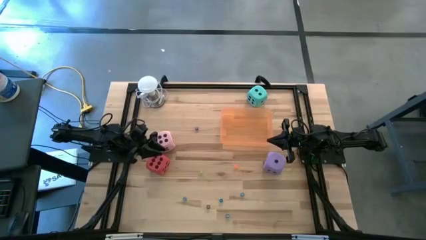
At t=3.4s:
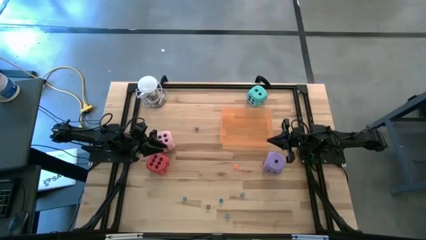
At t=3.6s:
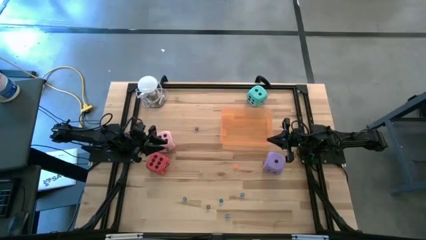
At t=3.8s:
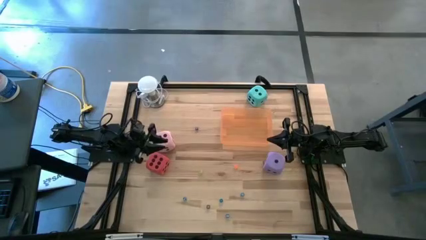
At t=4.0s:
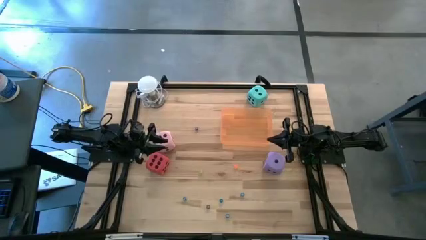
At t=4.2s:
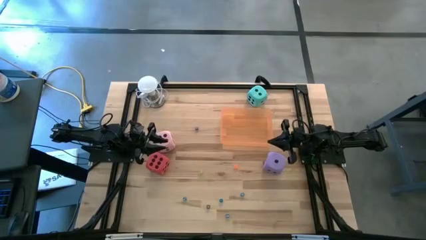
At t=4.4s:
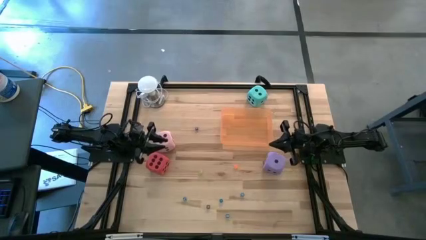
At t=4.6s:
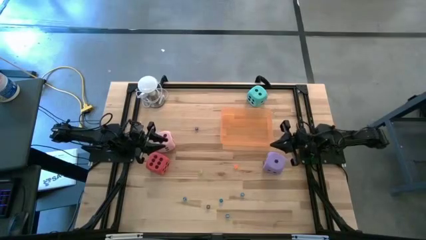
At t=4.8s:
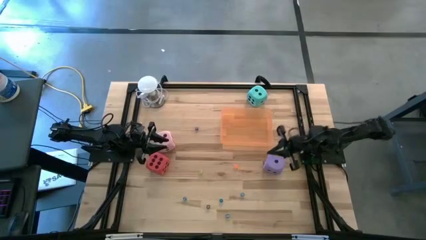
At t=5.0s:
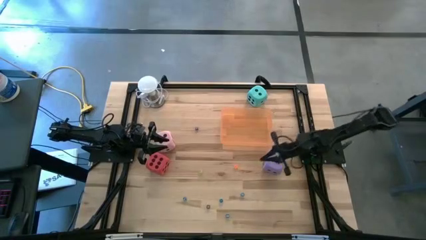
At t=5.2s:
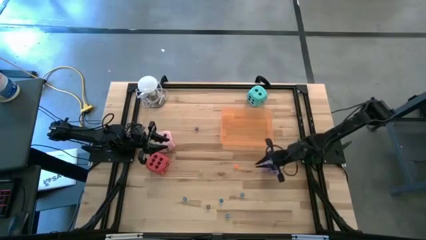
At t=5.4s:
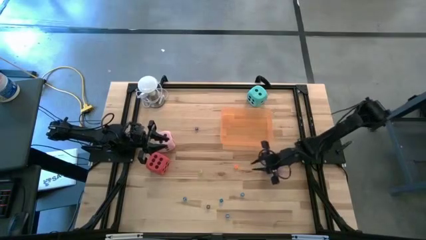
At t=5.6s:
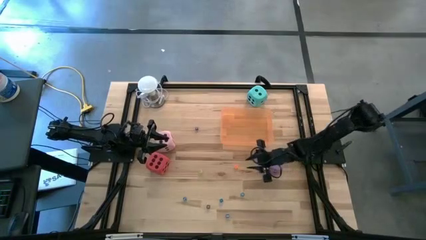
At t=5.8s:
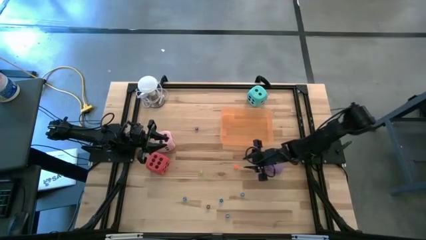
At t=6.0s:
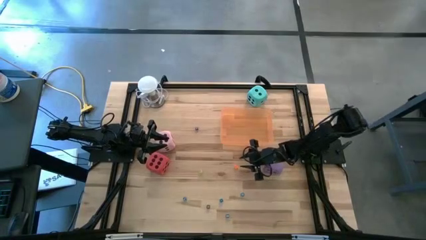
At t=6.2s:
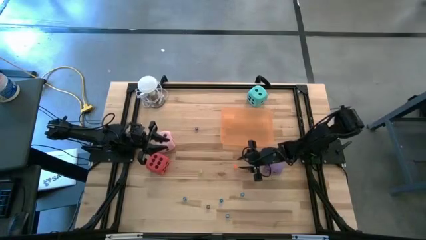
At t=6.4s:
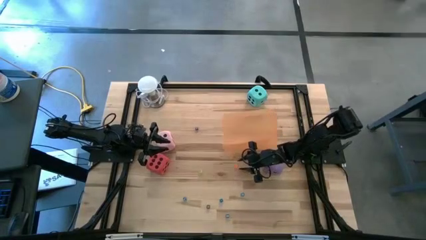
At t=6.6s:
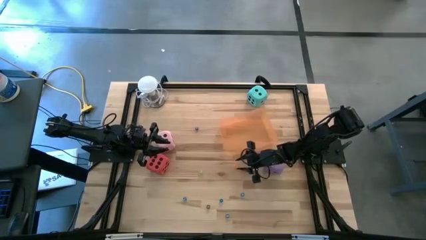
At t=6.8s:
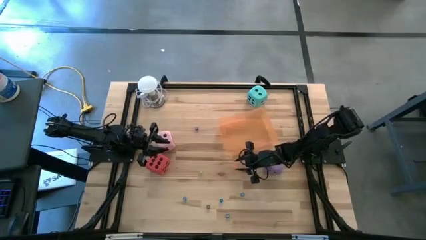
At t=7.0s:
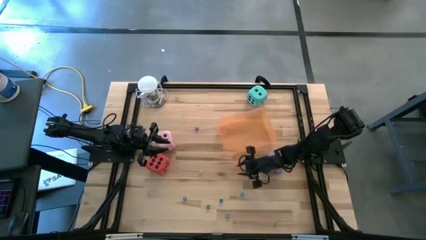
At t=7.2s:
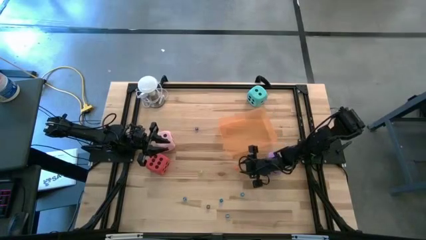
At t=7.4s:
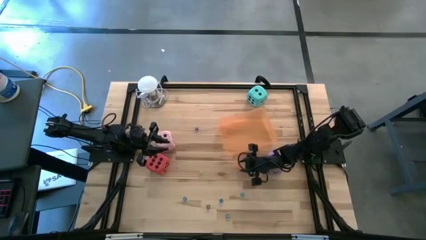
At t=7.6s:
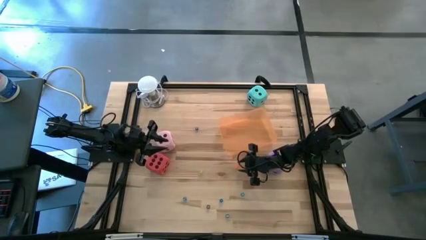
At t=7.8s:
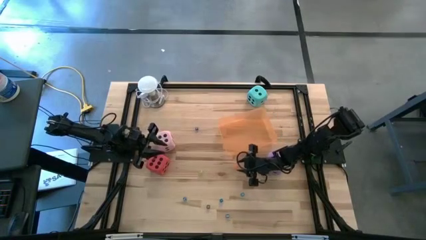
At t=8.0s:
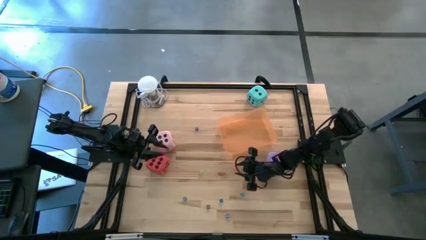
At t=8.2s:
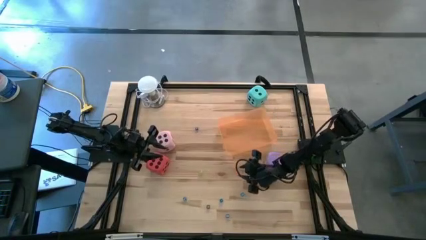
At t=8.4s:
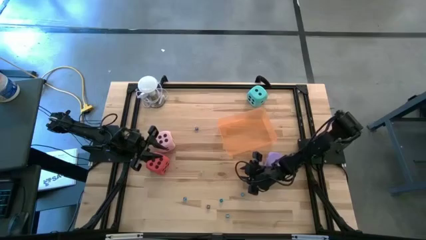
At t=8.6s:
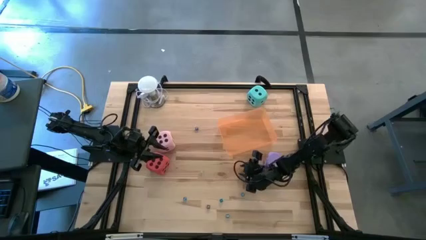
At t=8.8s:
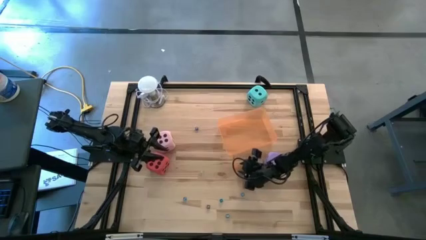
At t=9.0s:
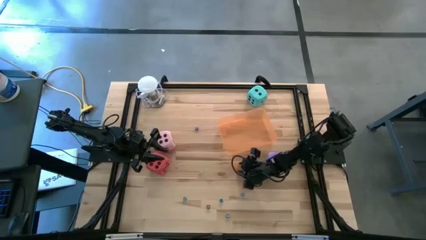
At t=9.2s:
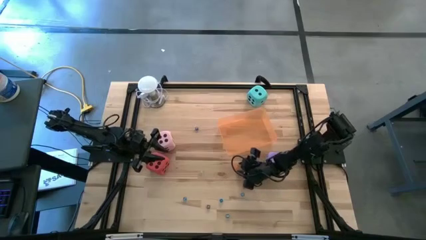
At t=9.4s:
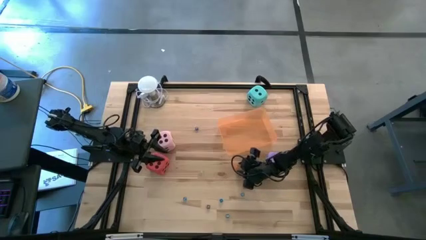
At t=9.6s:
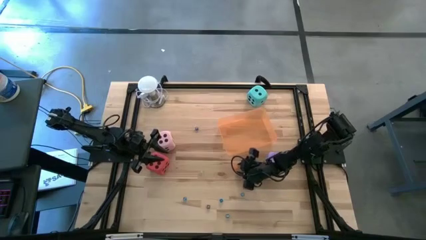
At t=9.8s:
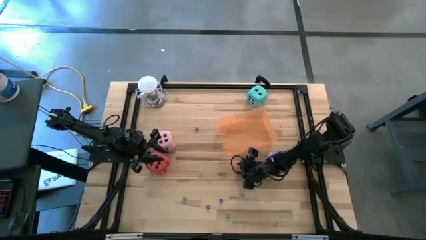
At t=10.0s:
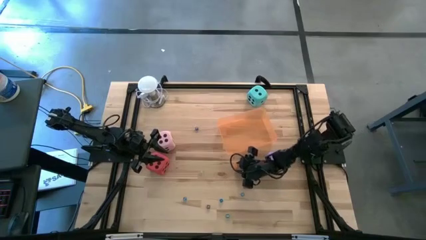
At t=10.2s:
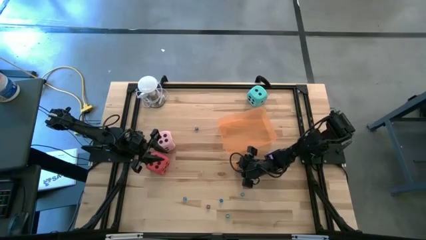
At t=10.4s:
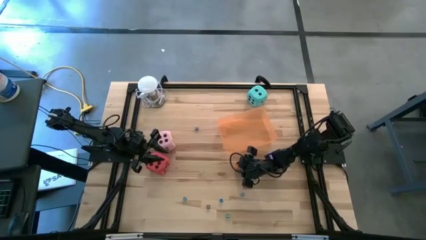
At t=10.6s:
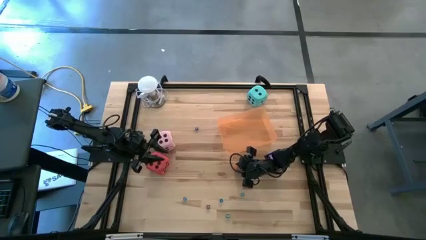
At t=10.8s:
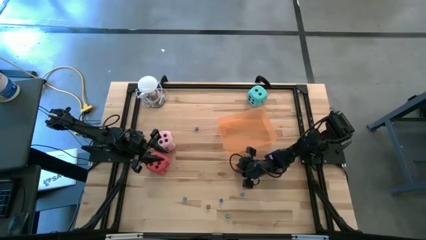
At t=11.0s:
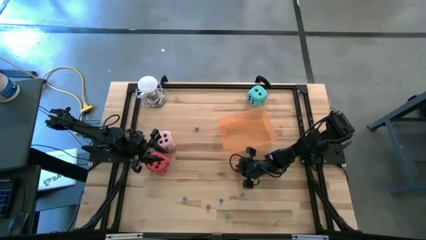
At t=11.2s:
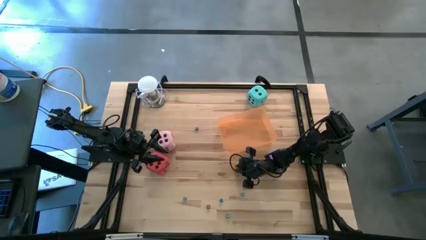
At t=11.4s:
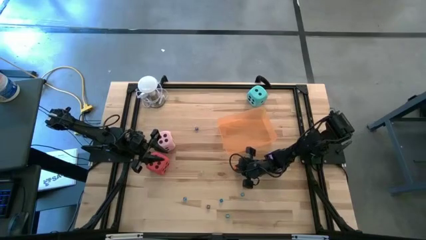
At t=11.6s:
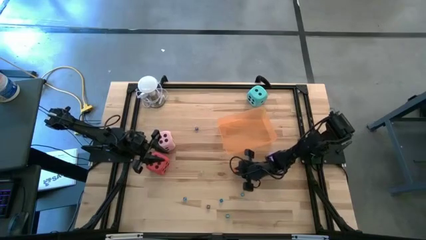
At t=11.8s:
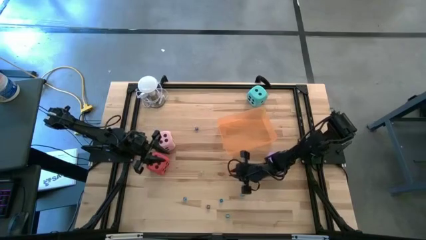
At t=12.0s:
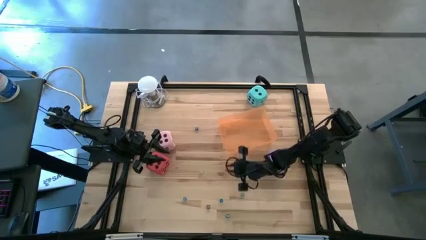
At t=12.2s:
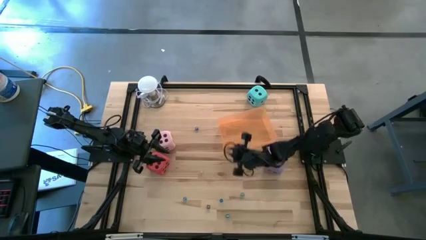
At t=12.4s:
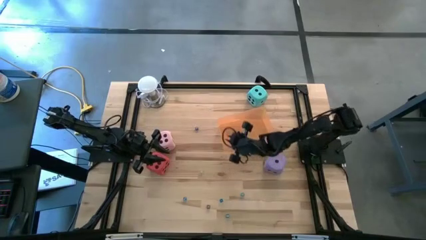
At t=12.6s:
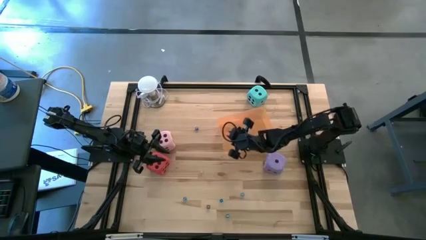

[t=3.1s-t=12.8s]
Task: Pick & Place Dice
Put the small orange dice into the orange bin

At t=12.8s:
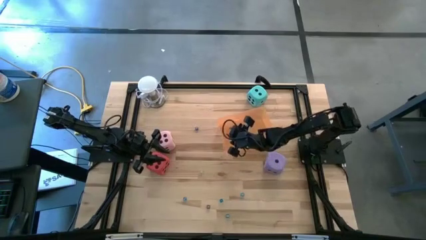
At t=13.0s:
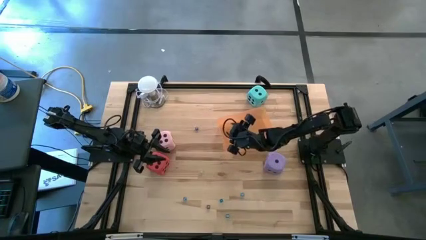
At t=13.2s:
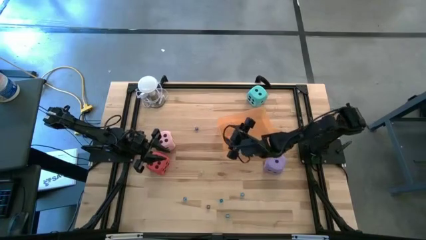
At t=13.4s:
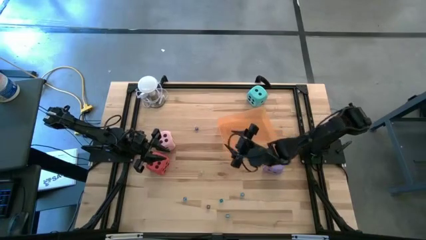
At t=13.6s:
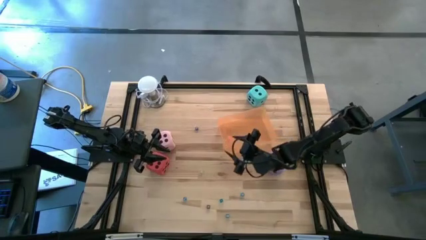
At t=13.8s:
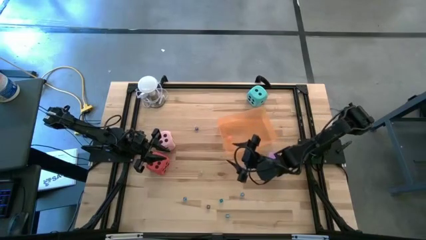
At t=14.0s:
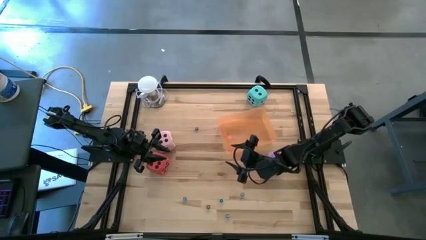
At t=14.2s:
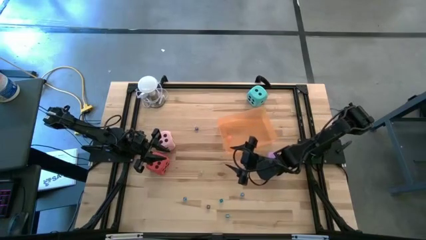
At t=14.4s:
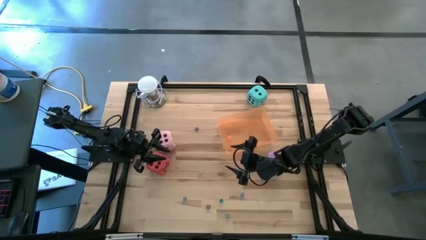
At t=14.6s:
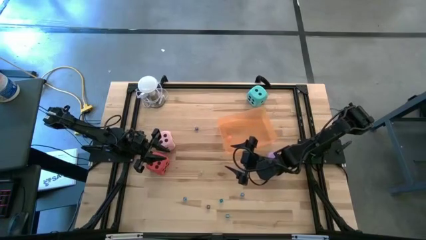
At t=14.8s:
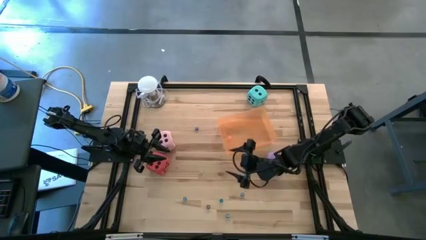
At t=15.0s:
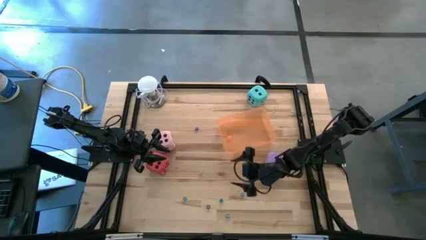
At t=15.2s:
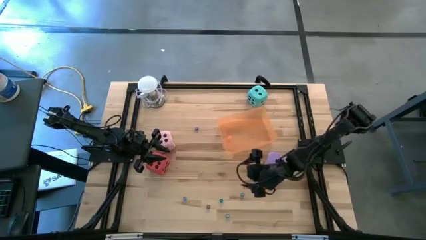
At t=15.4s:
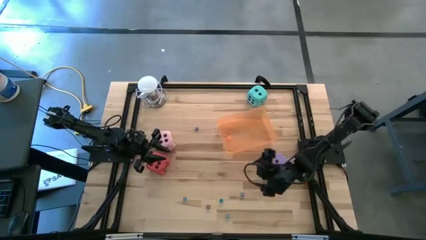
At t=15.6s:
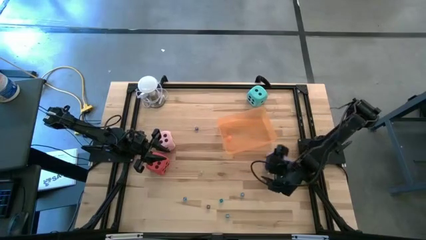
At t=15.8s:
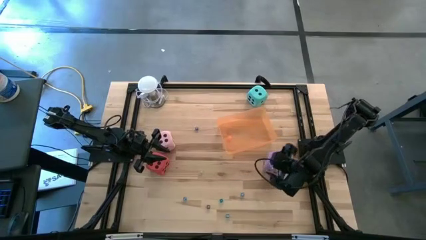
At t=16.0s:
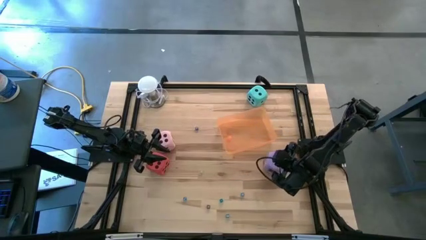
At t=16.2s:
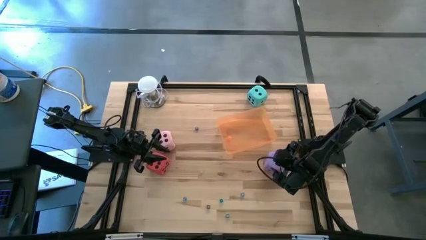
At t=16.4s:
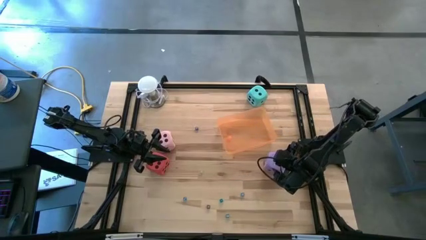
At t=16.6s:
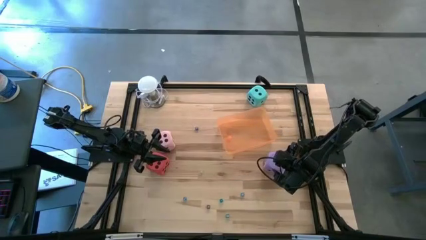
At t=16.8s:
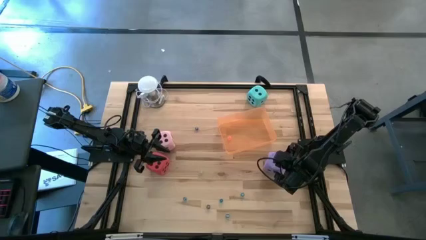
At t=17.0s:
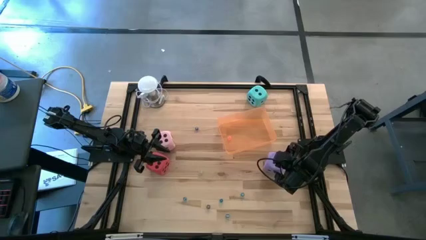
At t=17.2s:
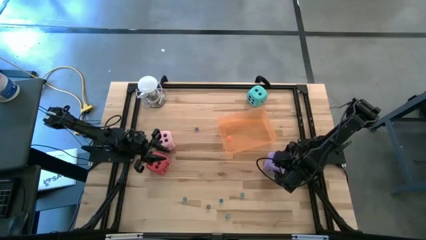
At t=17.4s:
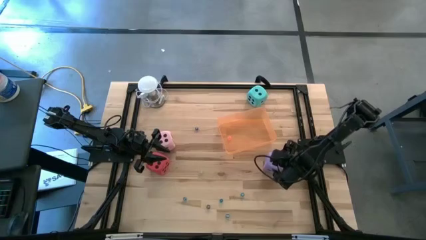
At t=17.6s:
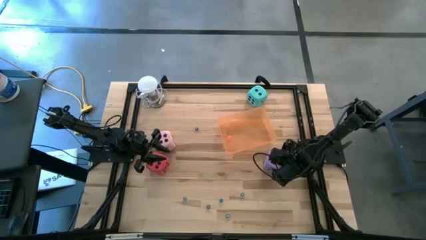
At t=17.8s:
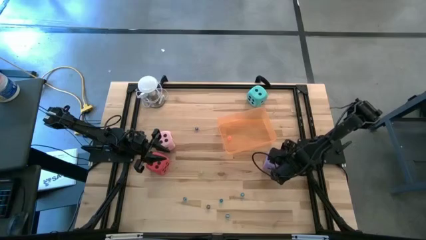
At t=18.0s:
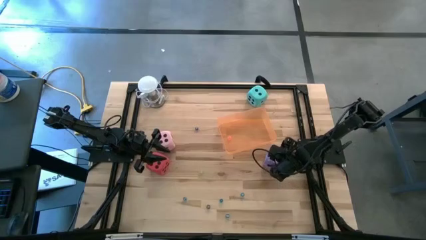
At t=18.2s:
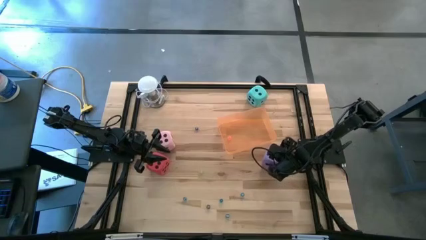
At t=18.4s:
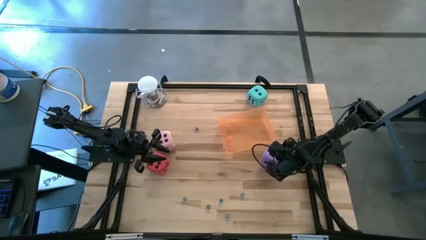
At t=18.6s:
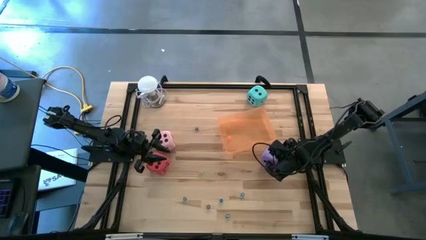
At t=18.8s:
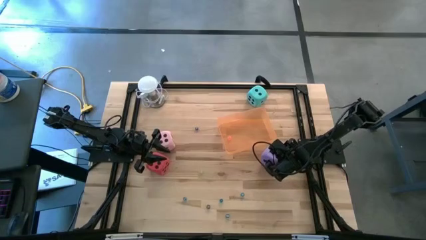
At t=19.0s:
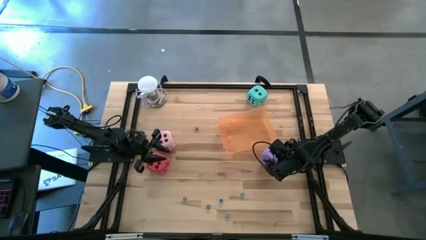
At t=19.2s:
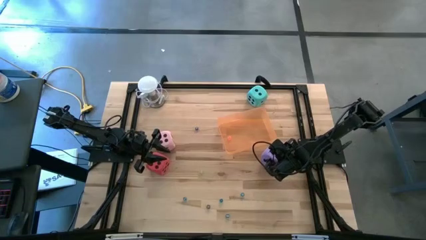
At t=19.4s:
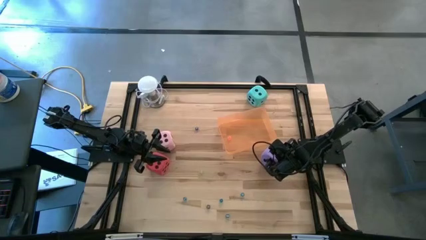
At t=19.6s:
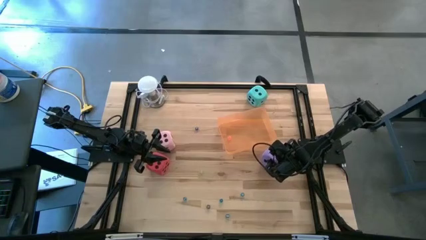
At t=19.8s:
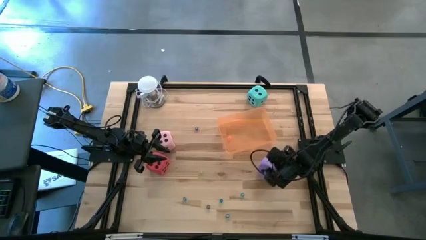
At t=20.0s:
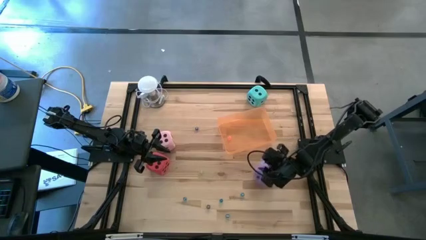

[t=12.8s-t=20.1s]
Put the large violet dice into the orange bin
